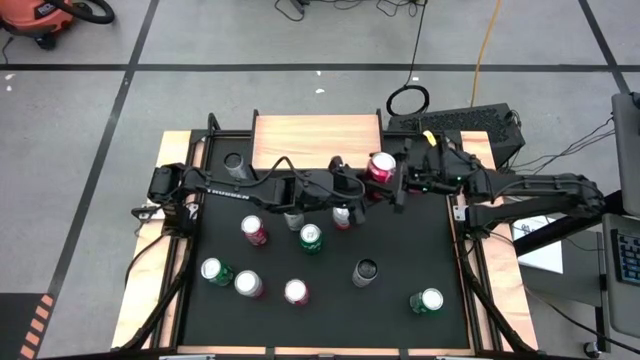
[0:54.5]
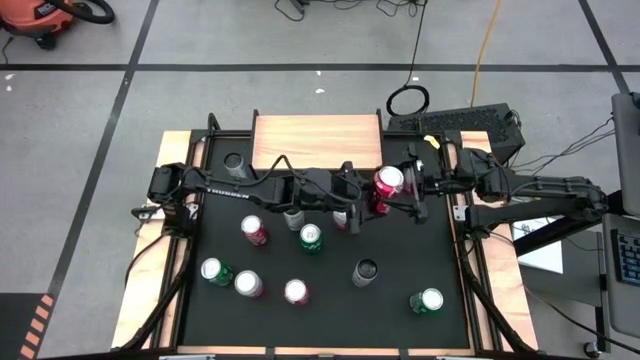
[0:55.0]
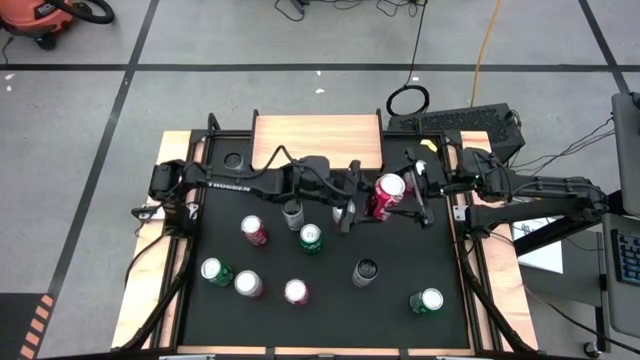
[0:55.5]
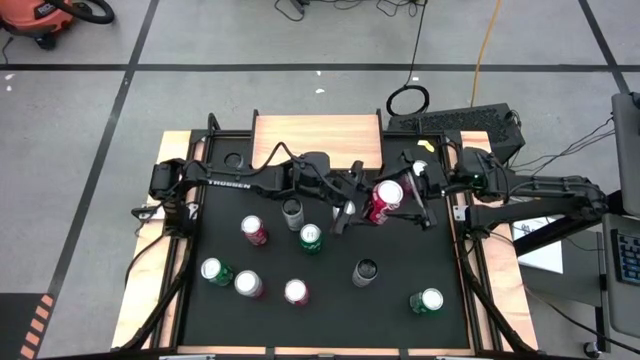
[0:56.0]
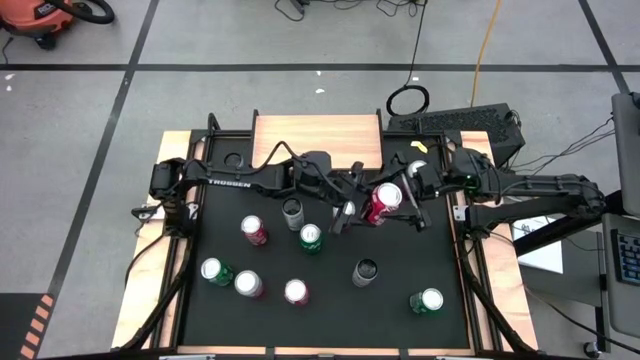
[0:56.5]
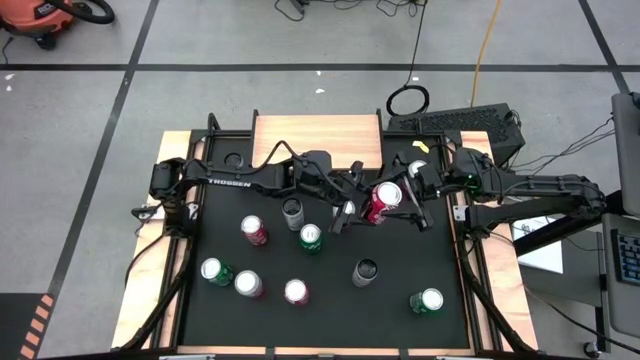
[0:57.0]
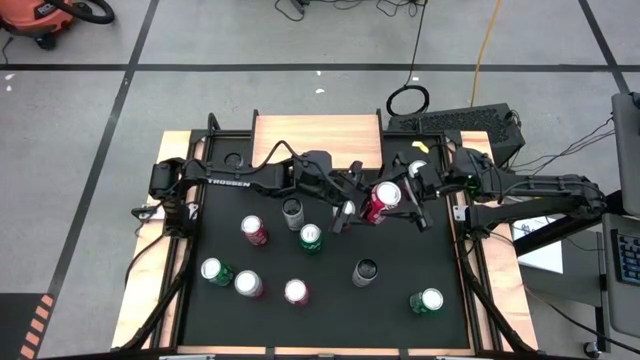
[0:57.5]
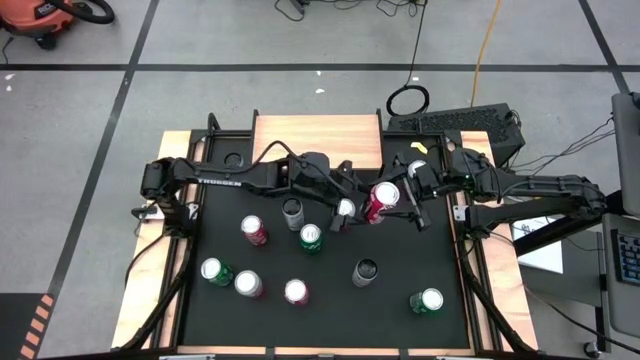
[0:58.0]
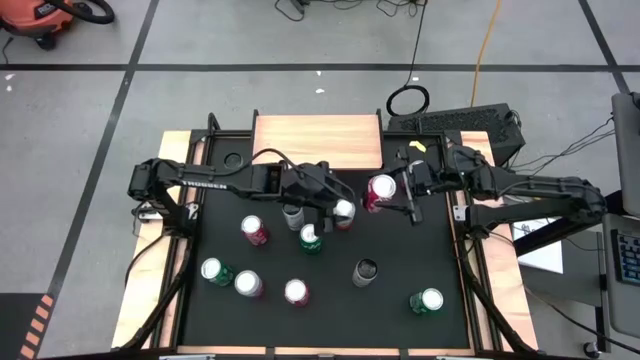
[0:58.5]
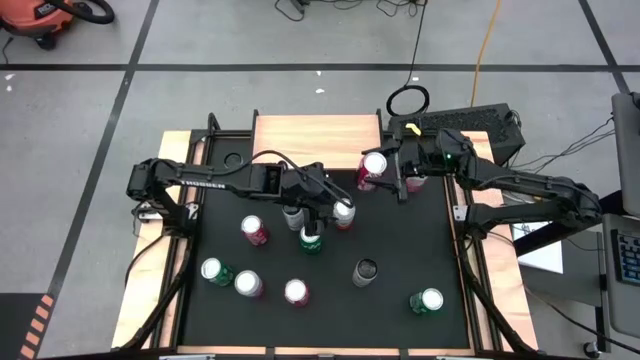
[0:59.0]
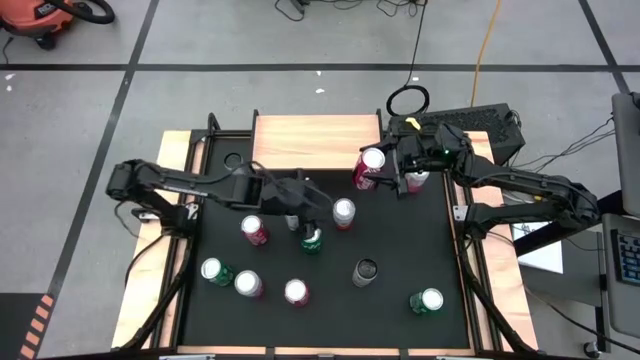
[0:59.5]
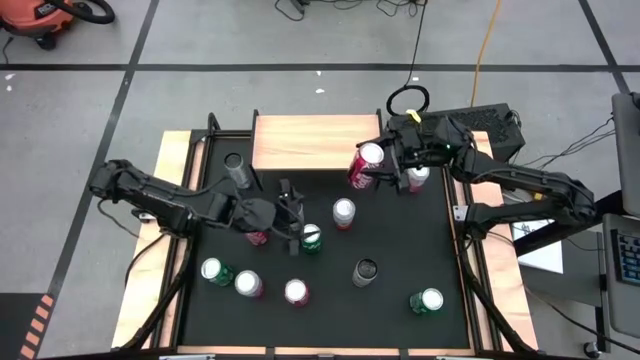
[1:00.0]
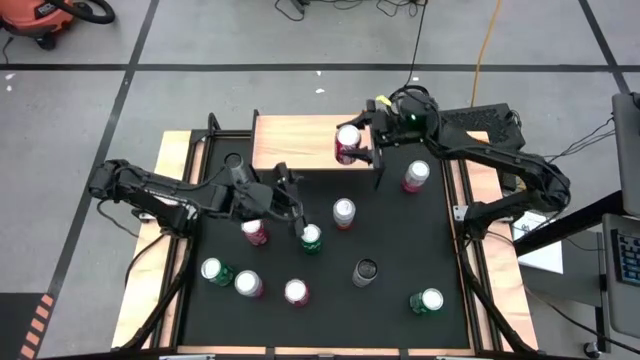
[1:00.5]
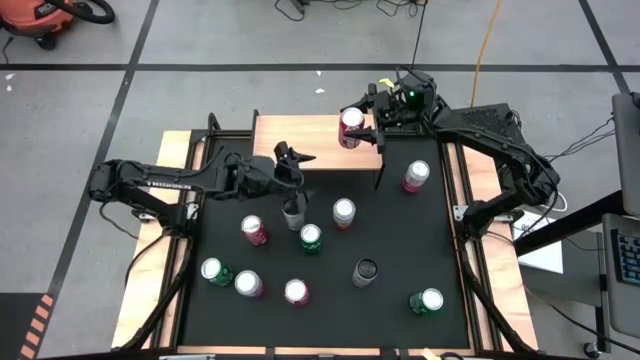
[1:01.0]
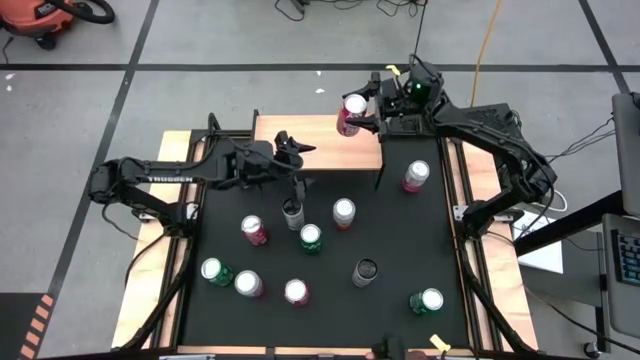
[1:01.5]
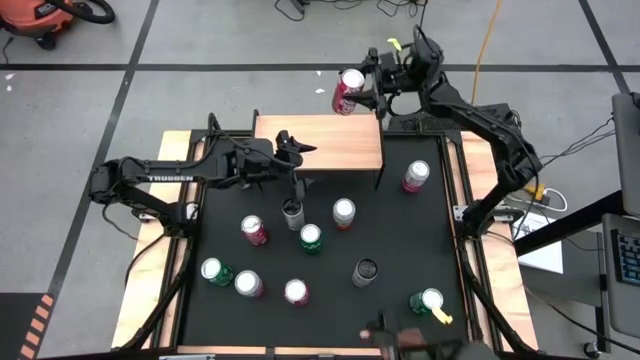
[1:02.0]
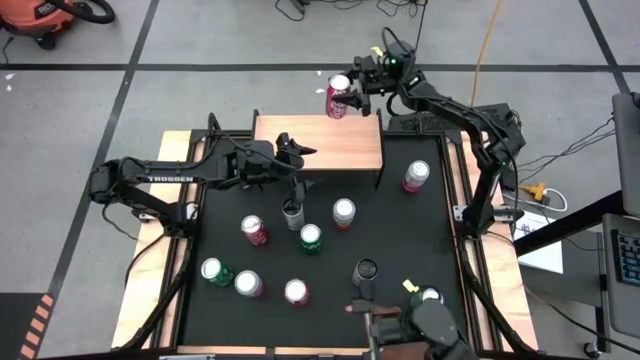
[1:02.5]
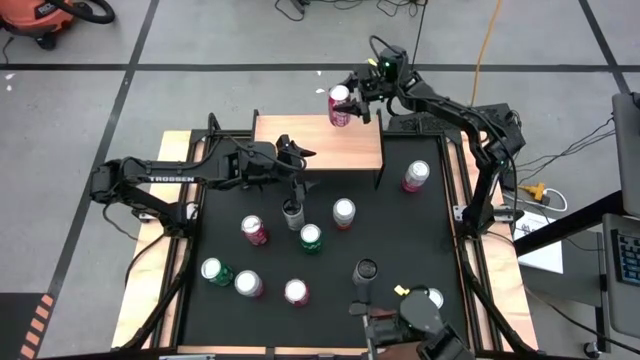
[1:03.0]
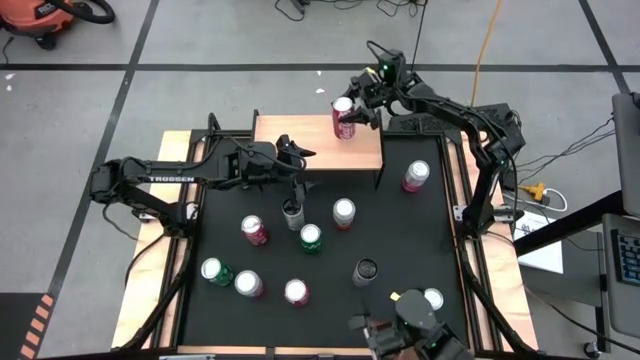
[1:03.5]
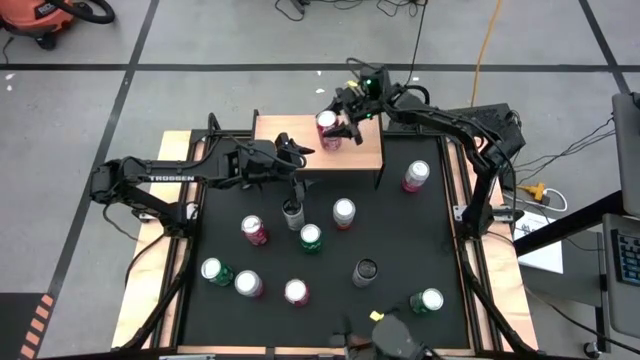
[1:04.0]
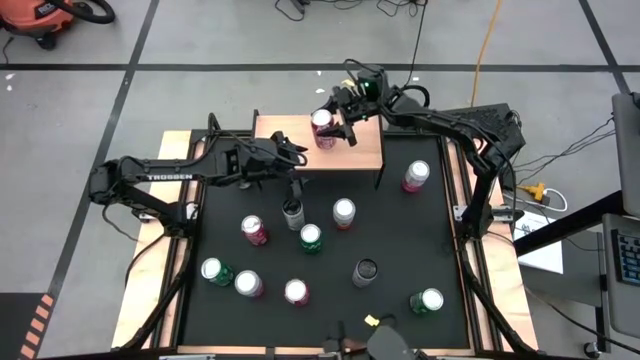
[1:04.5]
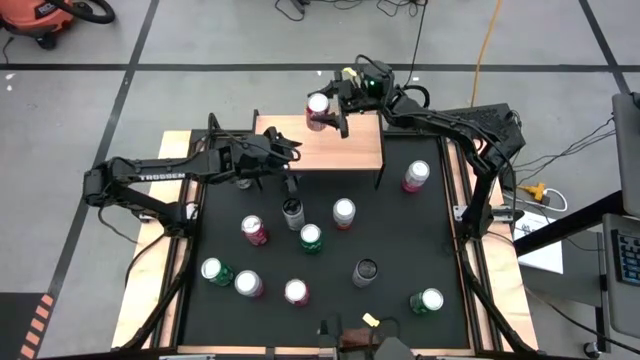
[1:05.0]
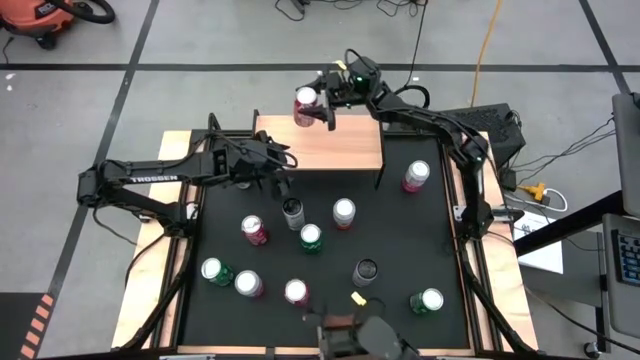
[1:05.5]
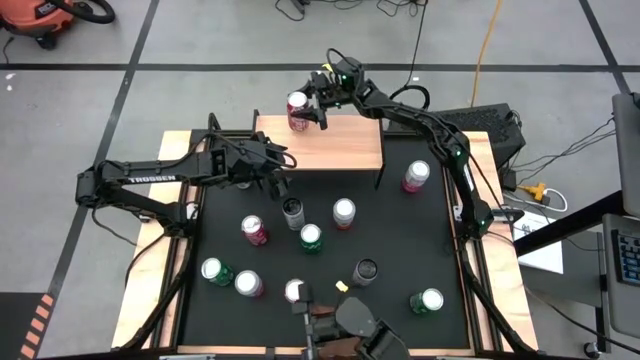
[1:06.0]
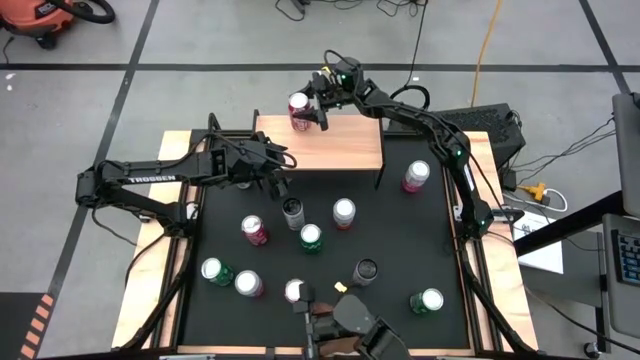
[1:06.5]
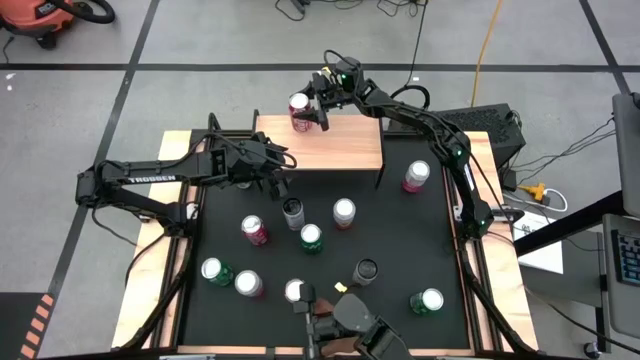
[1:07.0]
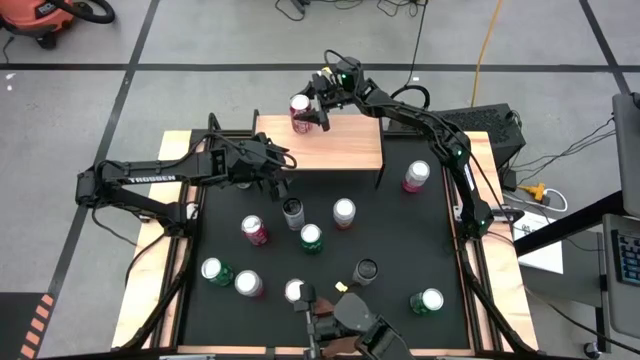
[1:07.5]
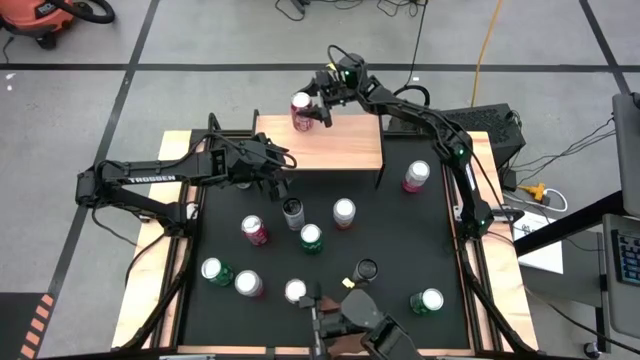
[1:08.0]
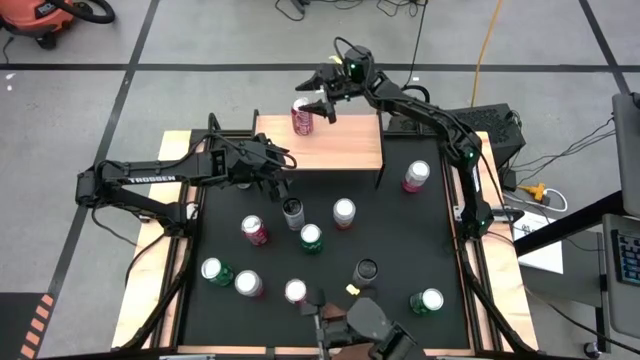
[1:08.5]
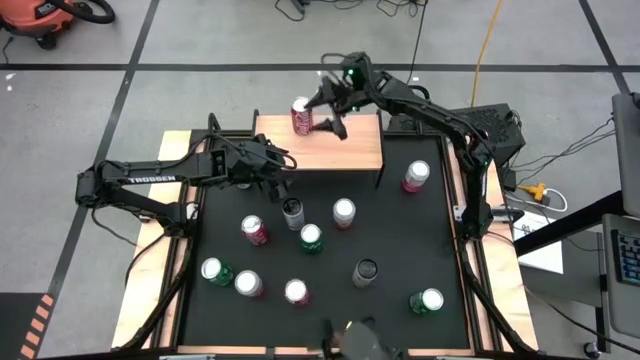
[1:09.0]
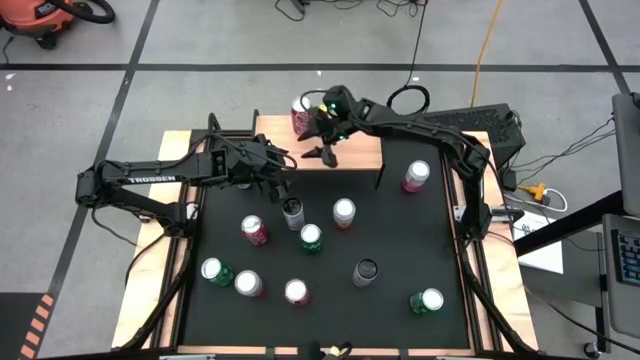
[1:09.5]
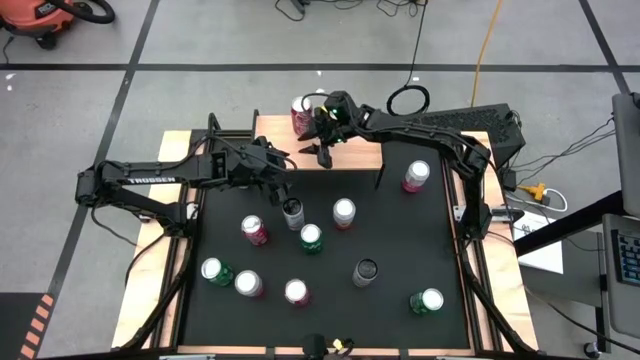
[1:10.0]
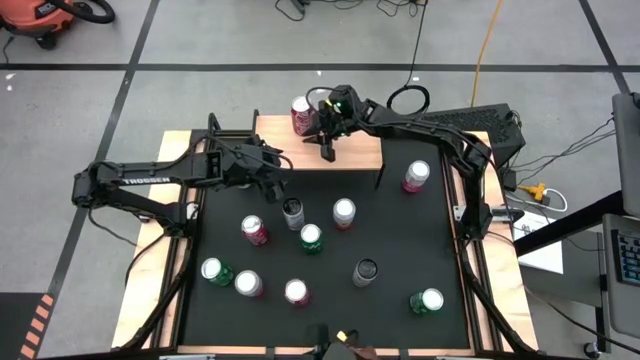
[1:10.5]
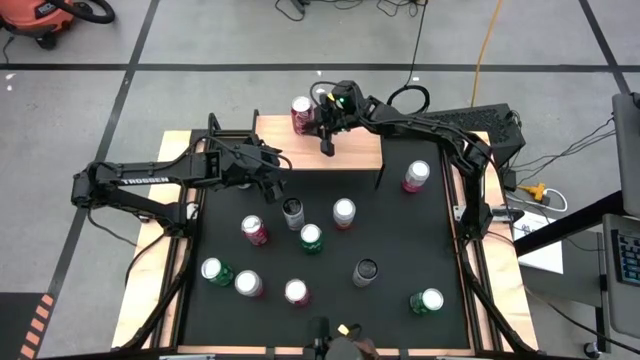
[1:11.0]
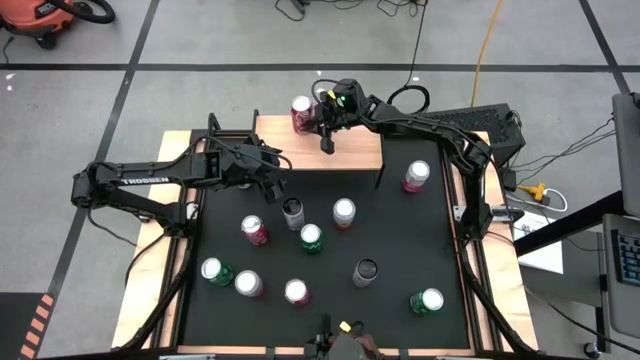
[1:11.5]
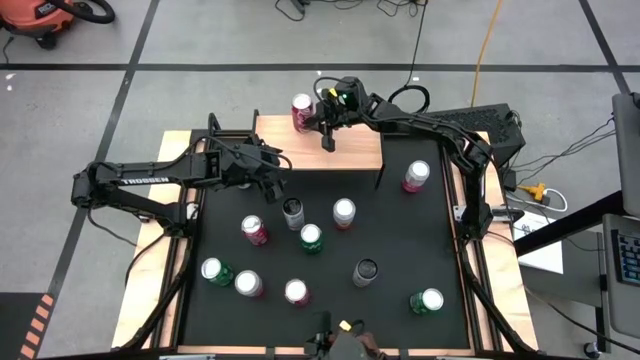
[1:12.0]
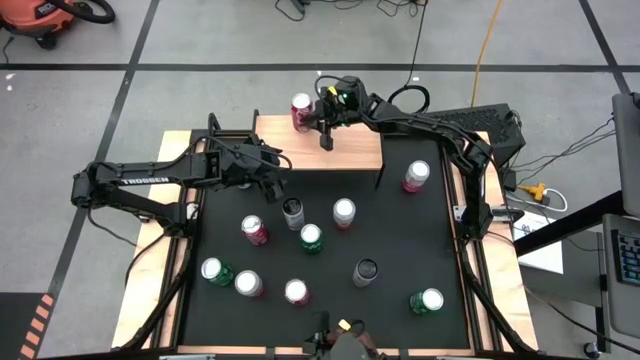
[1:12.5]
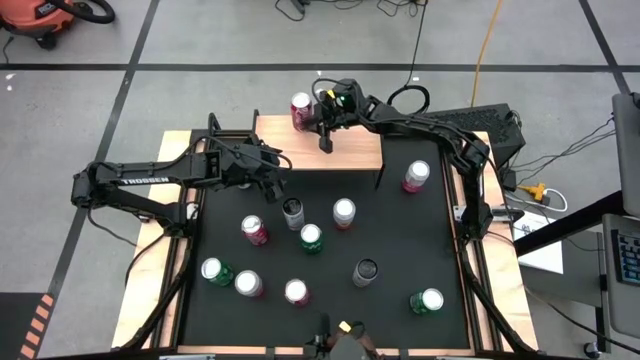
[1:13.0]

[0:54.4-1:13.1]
Task: Place canned beverage on shelf
Put the top right red soda can on the shelf

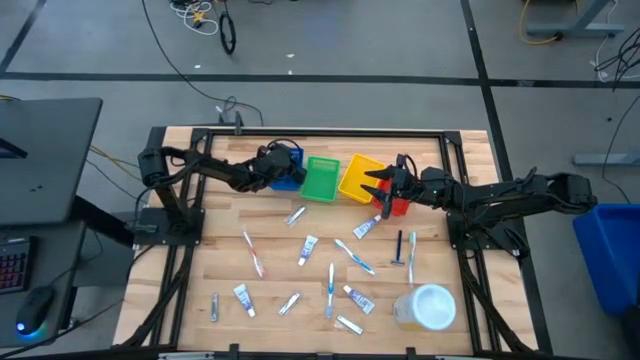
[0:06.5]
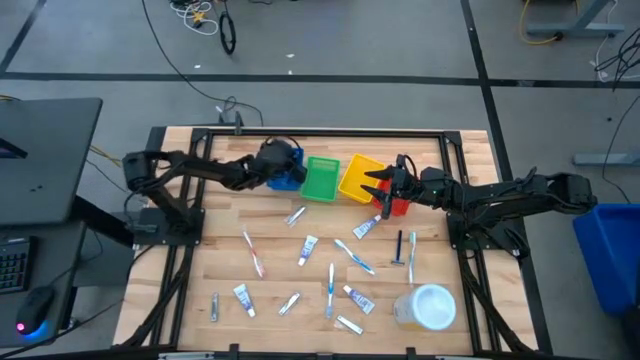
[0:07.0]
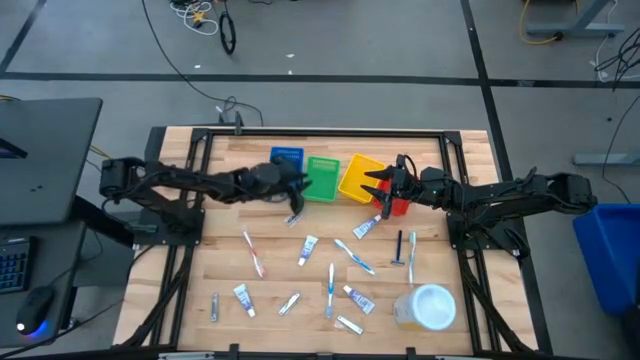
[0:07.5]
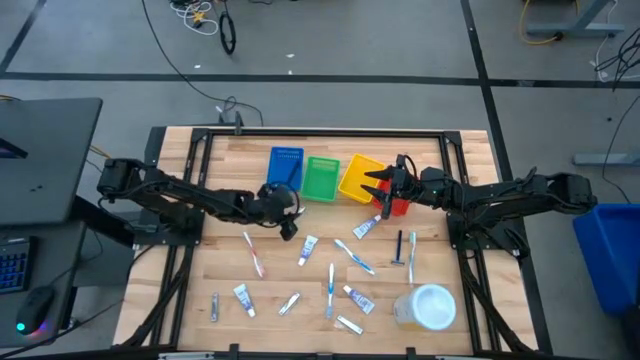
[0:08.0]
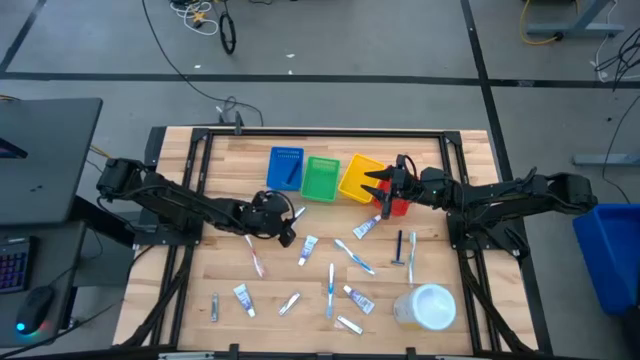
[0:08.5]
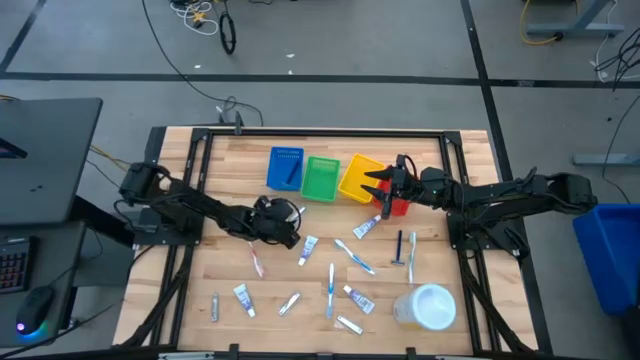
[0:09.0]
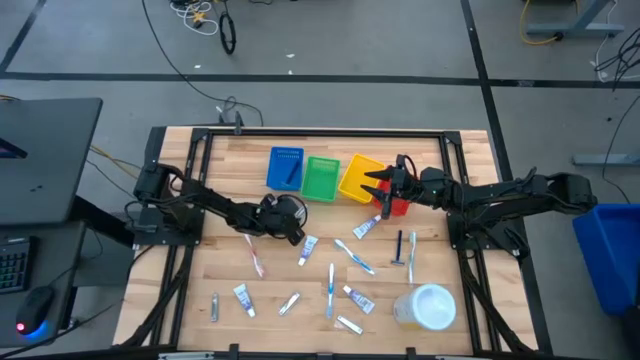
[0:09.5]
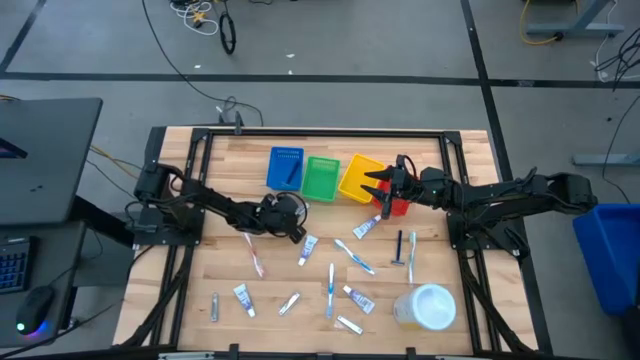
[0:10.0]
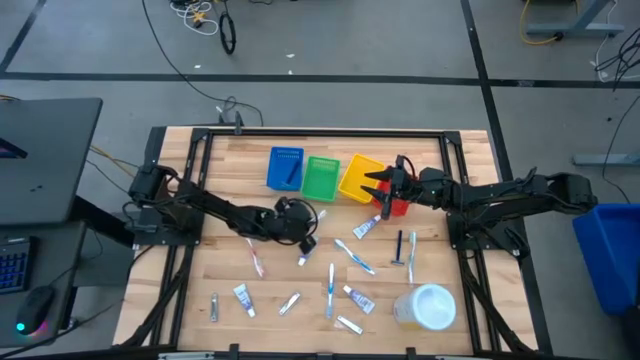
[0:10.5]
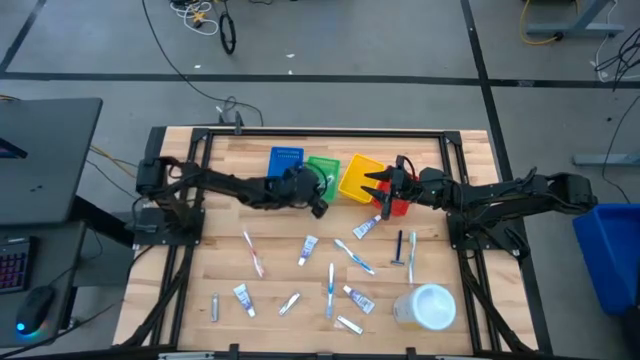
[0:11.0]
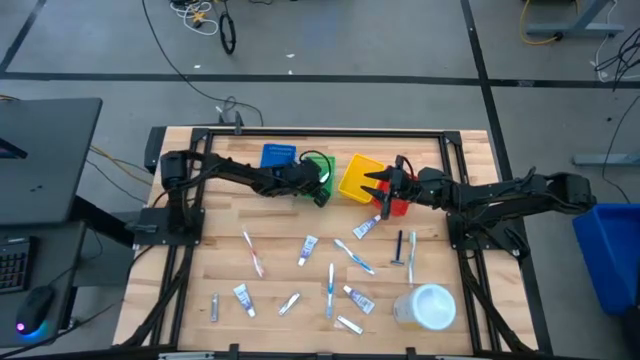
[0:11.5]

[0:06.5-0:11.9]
Task: Pick & Place Travel size toiletries
Put the silver nail cutter into the green bin
